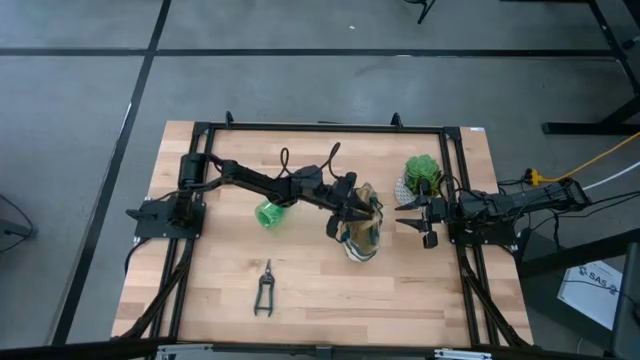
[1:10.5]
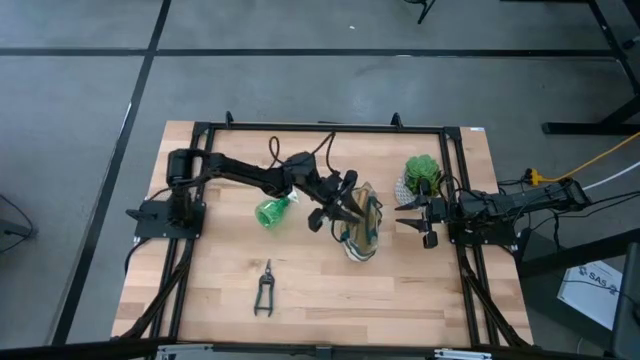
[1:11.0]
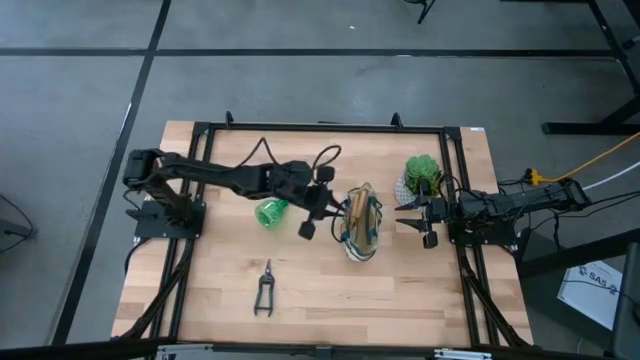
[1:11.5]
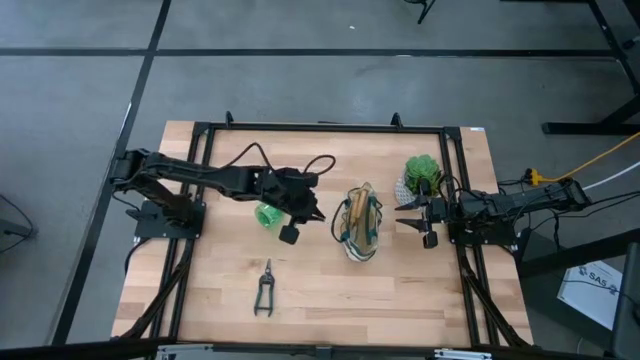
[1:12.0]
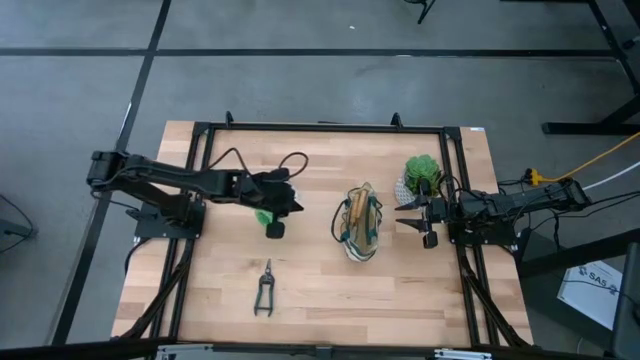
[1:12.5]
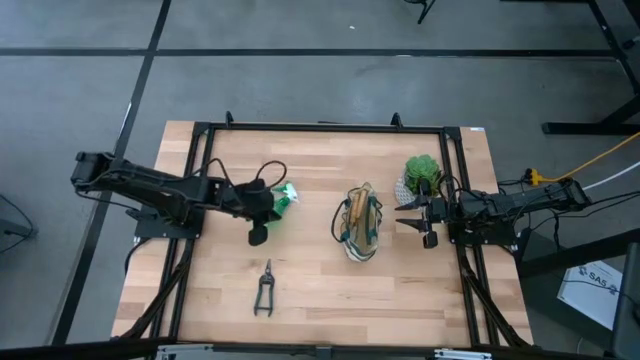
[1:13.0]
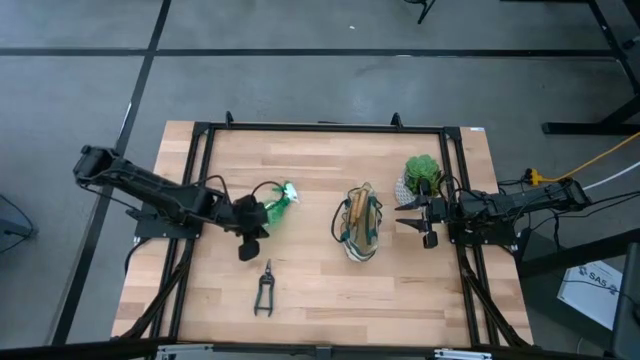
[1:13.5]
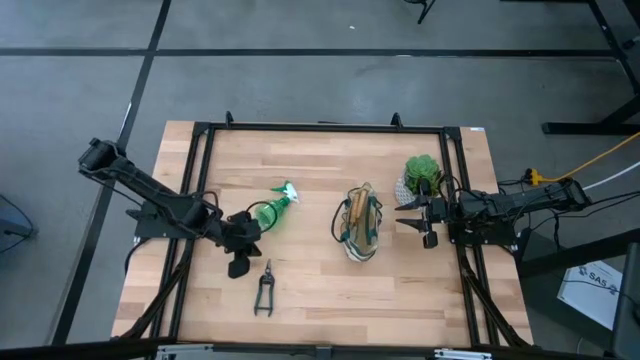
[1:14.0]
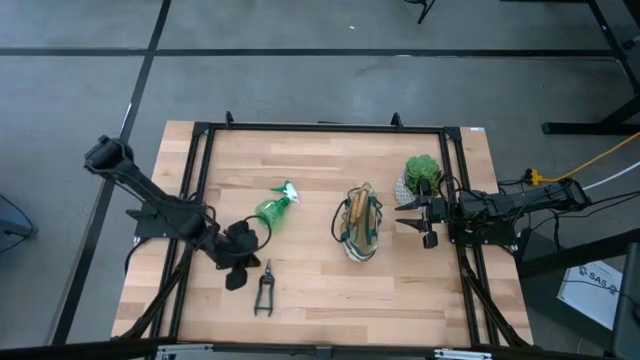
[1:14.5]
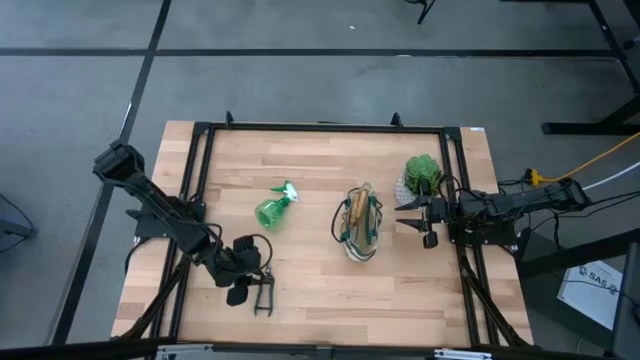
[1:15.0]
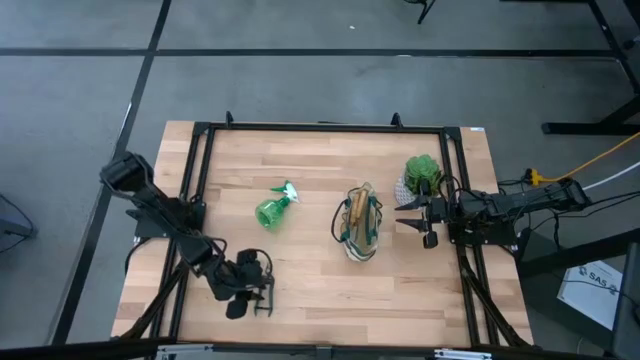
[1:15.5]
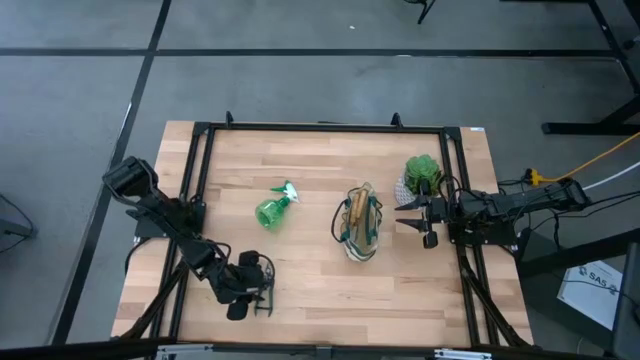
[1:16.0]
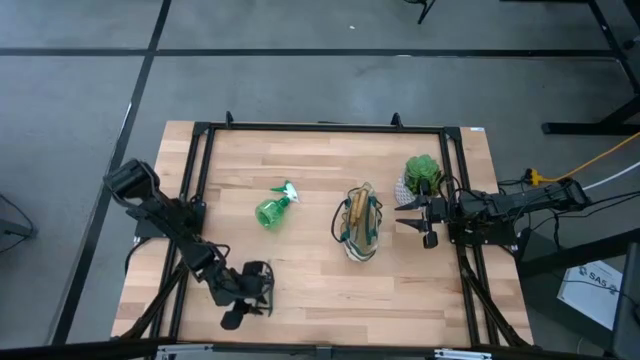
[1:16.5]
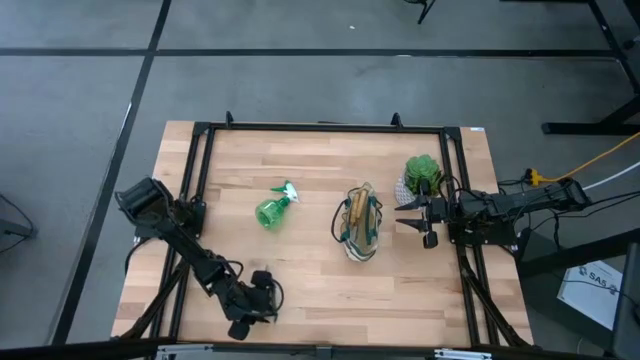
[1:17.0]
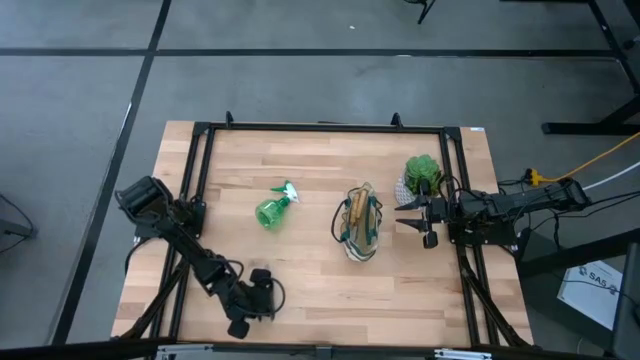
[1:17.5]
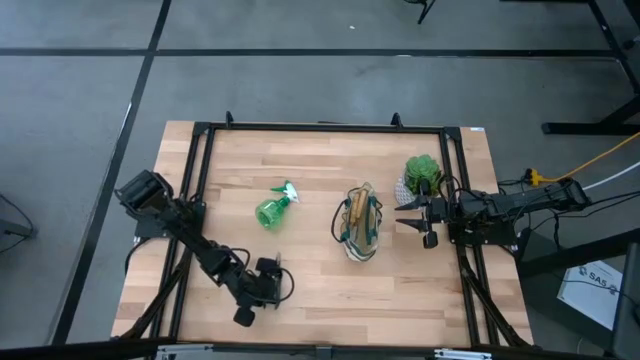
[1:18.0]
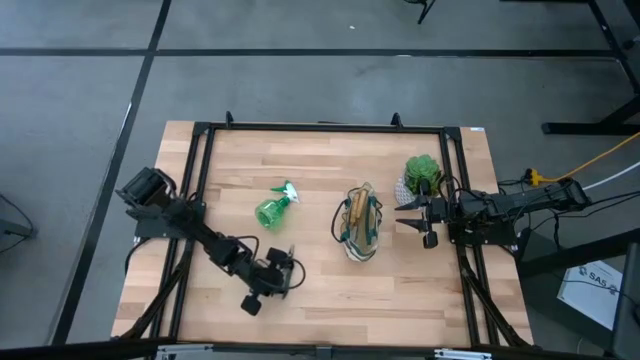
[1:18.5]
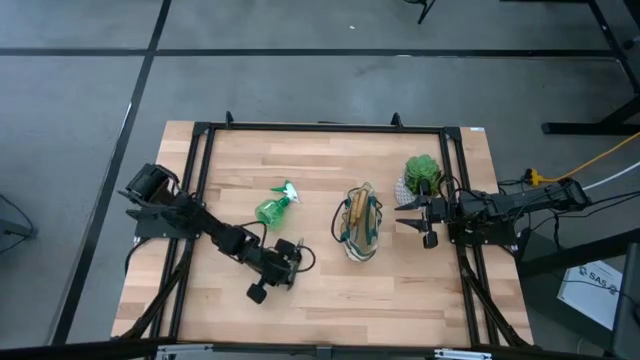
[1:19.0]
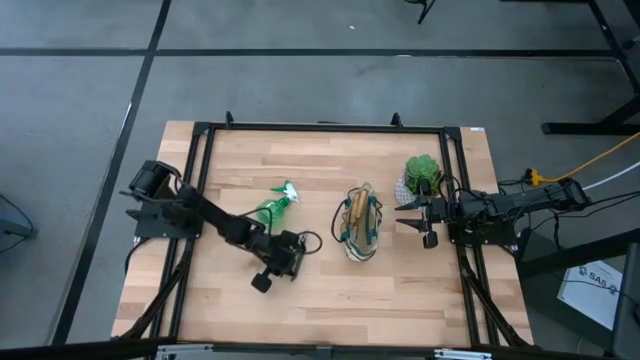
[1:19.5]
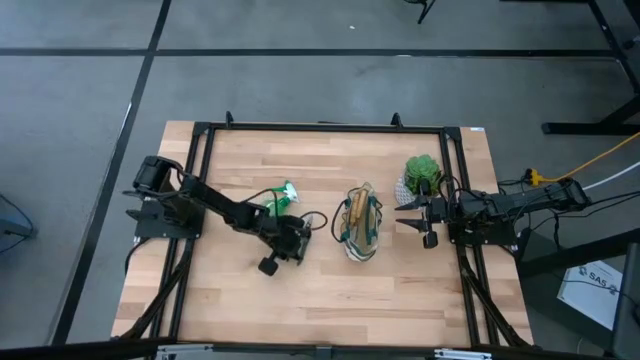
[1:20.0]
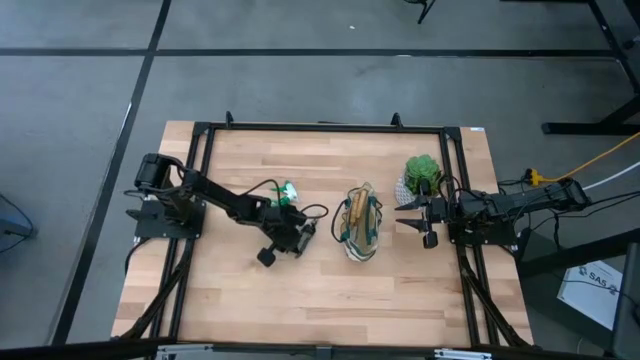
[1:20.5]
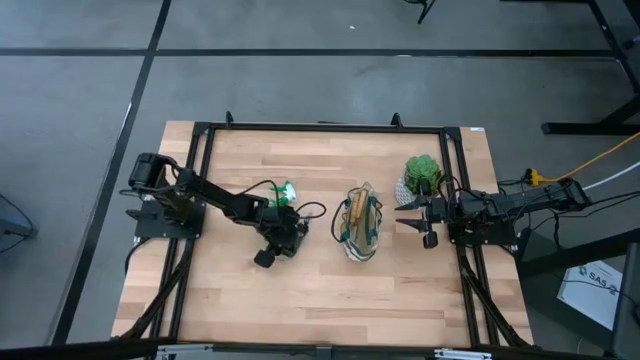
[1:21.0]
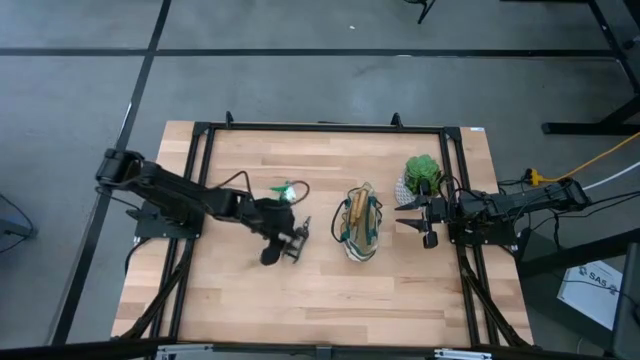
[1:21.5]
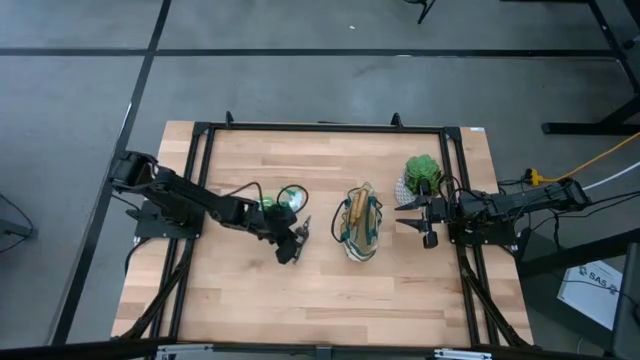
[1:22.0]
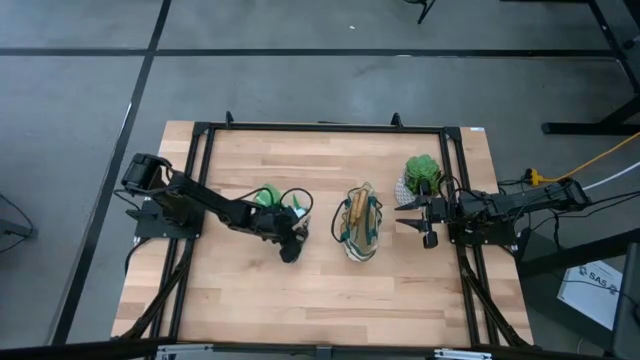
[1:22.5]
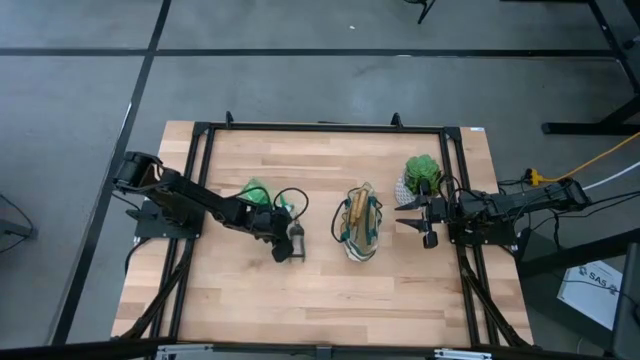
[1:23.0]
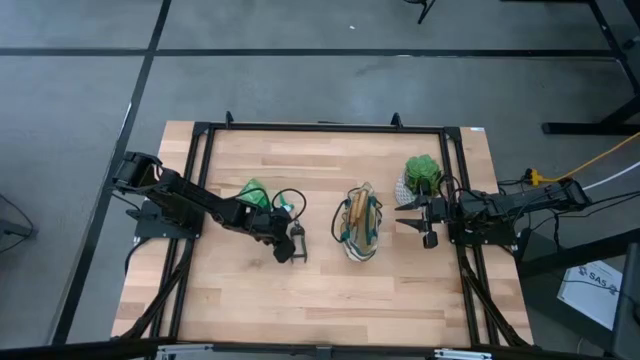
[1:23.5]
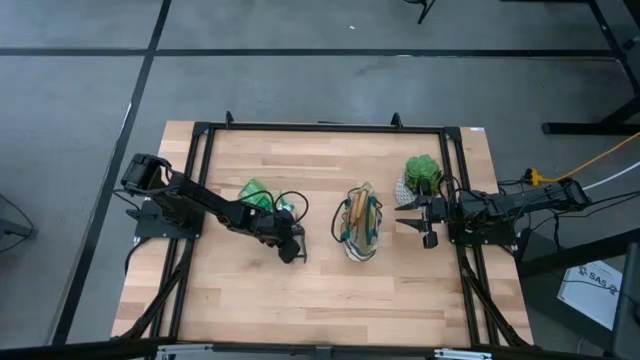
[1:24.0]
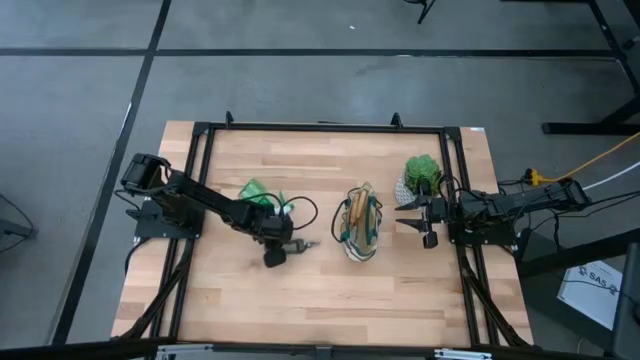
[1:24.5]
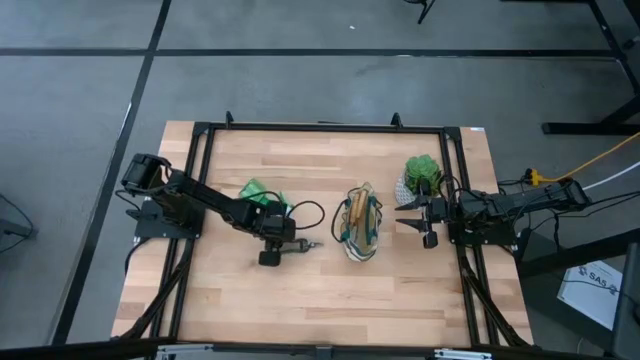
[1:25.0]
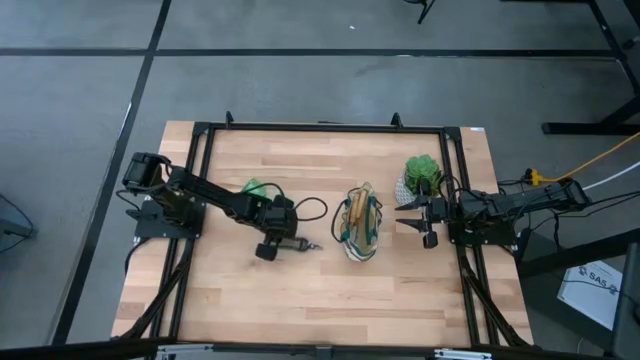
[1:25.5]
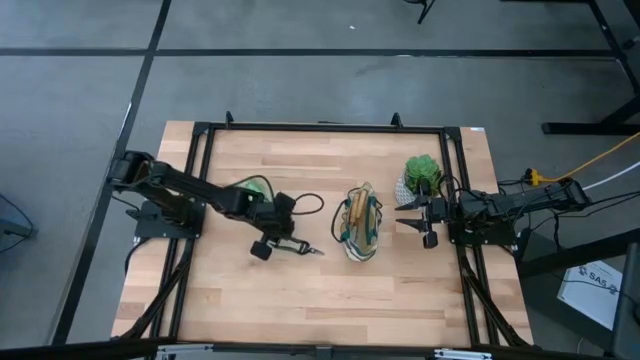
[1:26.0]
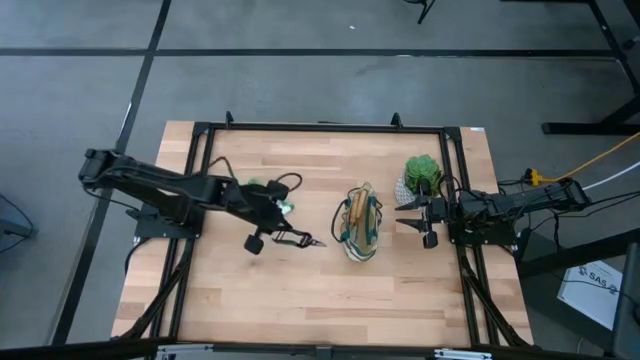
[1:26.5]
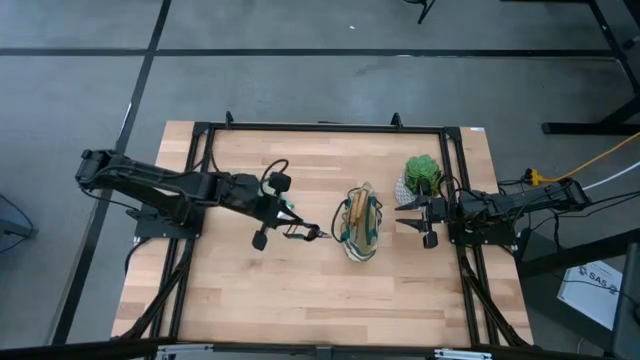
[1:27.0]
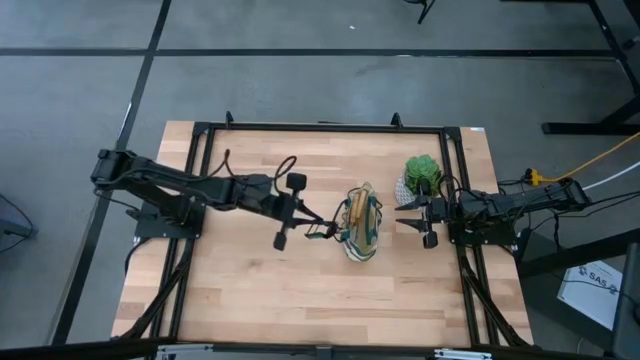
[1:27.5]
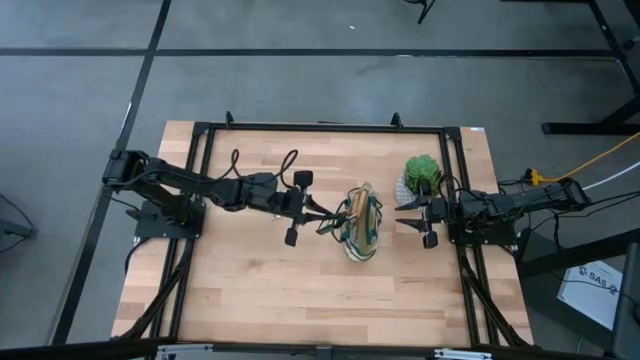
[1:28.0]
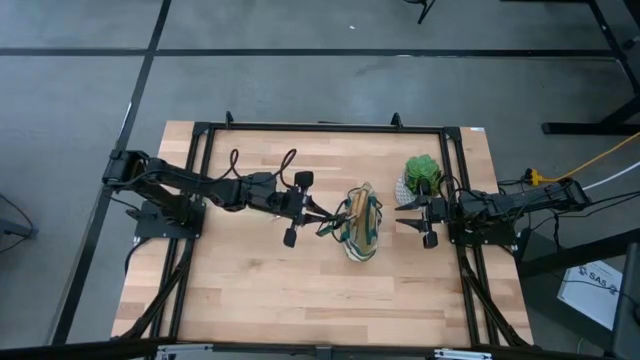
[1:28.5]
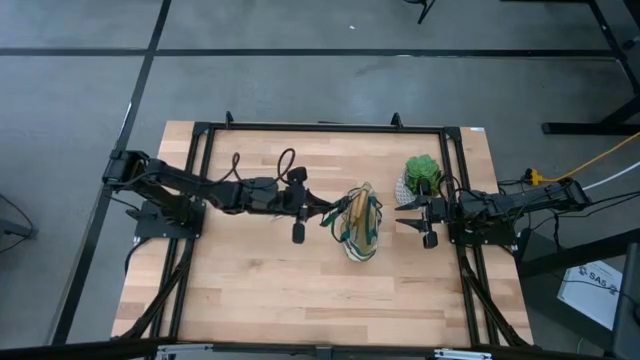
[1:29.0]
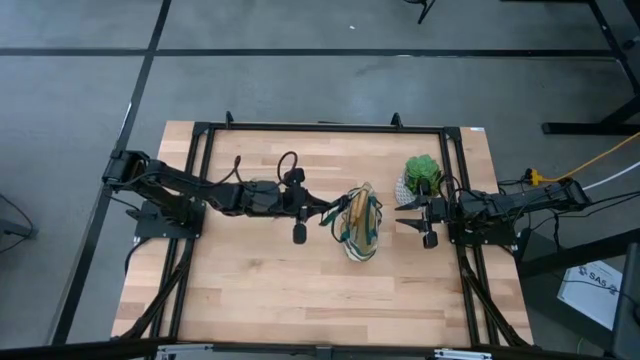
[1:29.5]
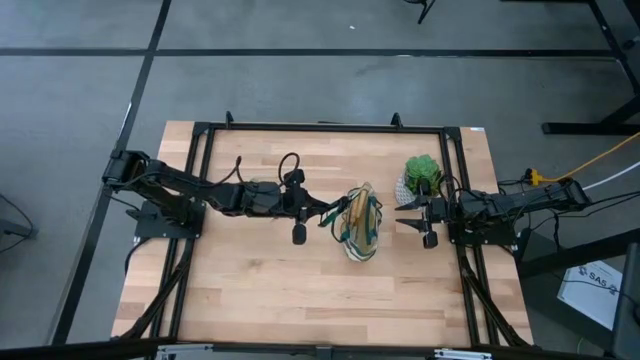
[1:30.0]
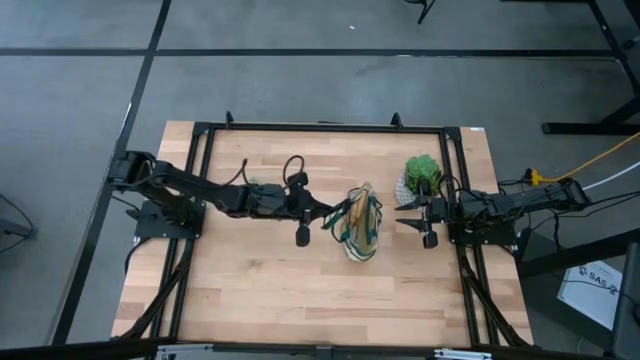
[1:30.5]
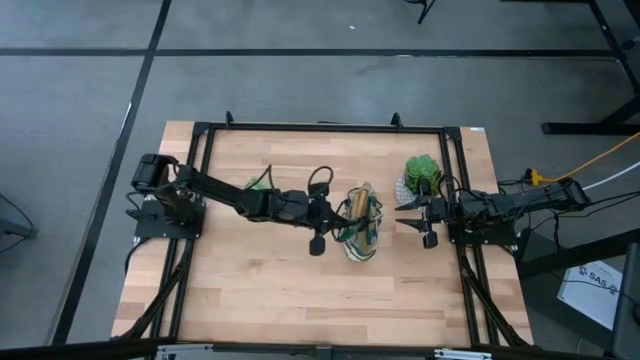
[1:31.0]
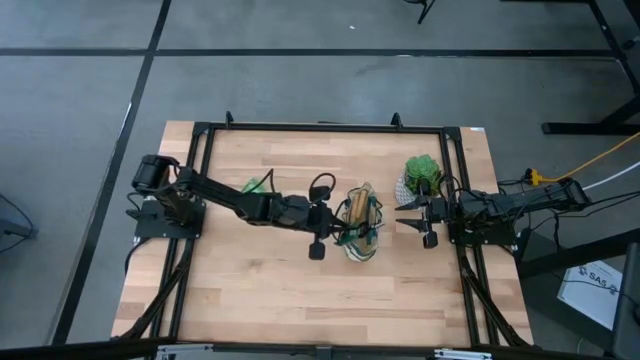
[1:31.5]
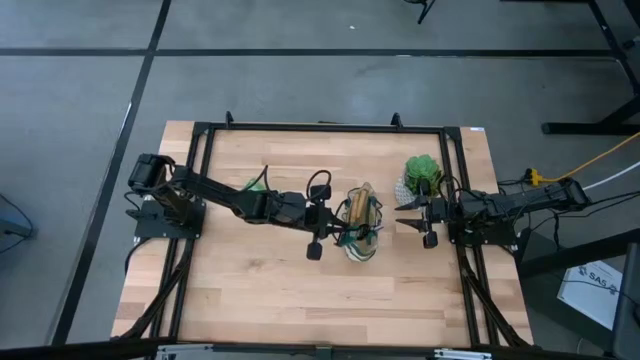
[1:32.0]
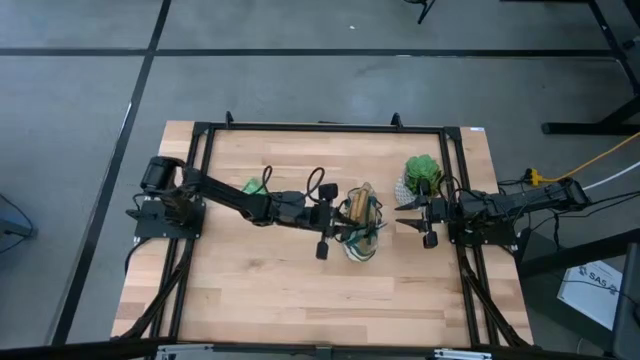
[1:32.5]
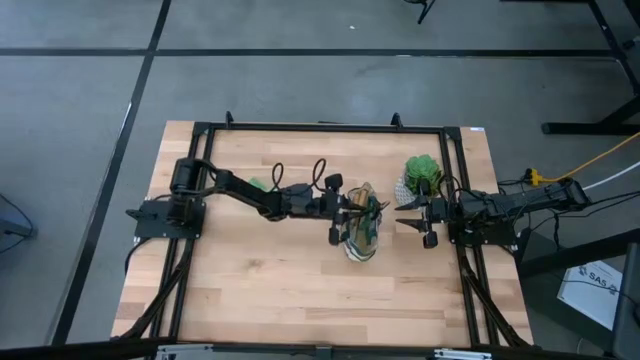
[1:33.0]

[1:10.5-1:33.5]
Task: Pick & Place Garden tools in Gardening bag
Put the green scissors into the white gardening bag
